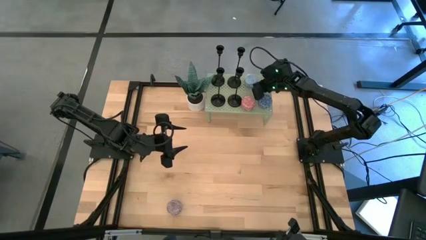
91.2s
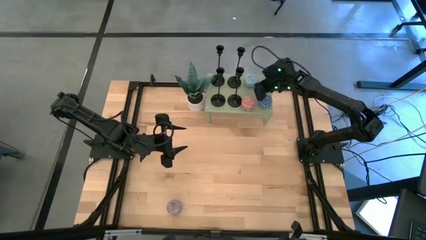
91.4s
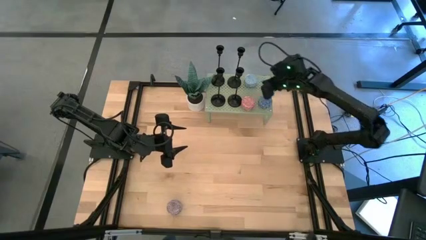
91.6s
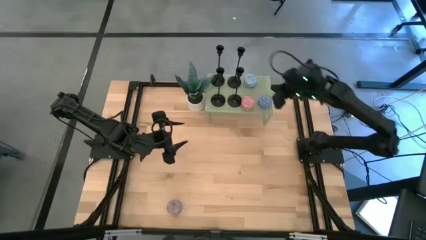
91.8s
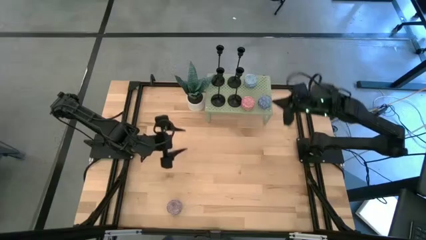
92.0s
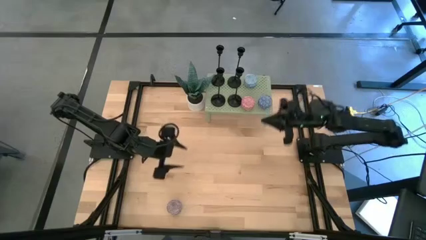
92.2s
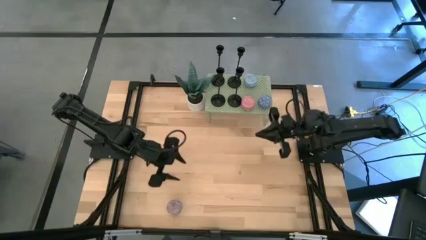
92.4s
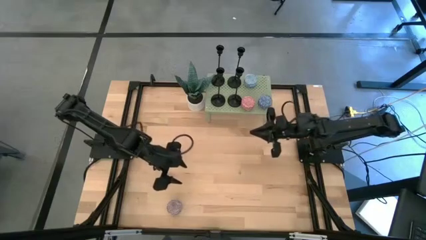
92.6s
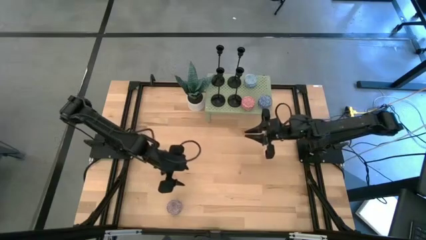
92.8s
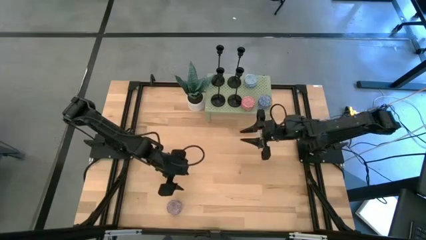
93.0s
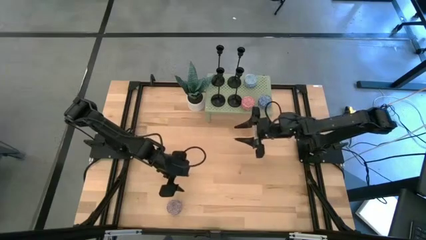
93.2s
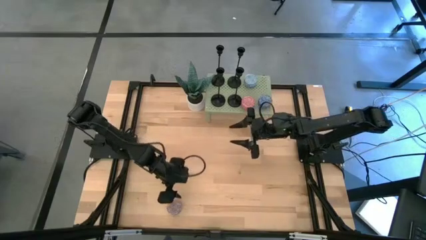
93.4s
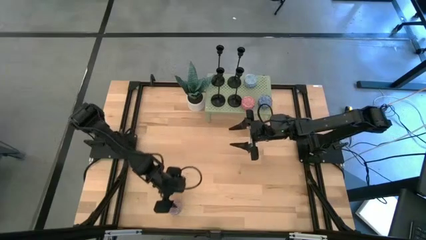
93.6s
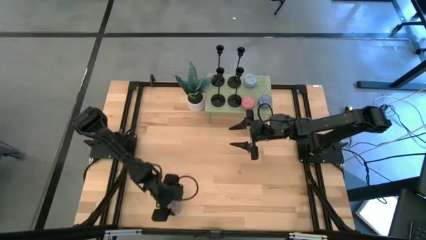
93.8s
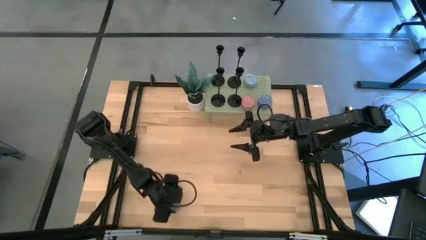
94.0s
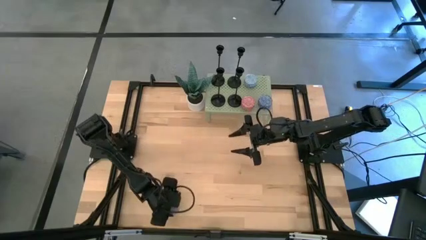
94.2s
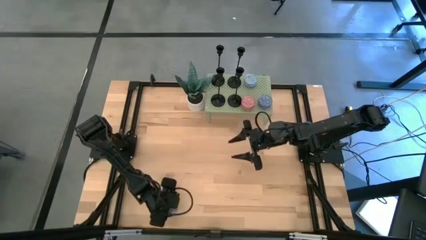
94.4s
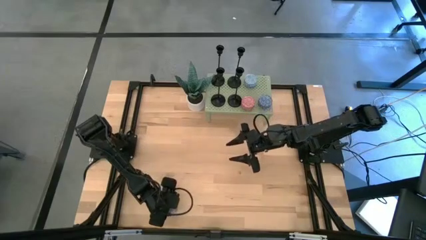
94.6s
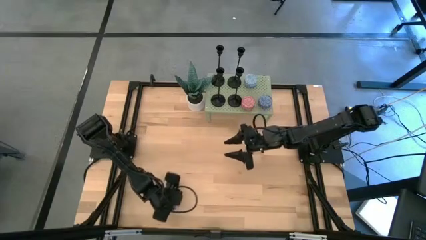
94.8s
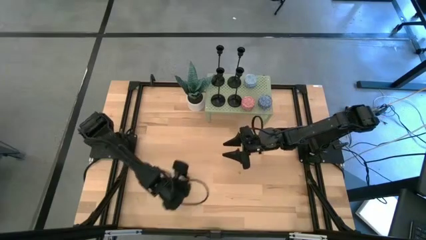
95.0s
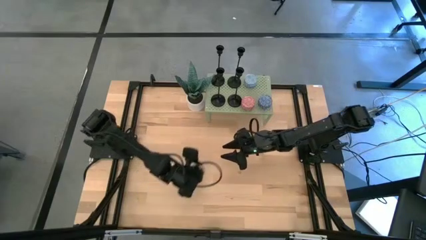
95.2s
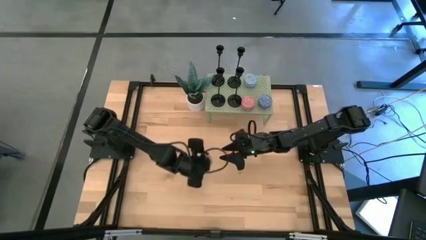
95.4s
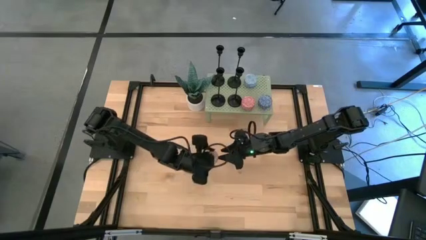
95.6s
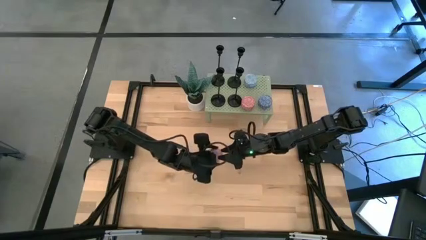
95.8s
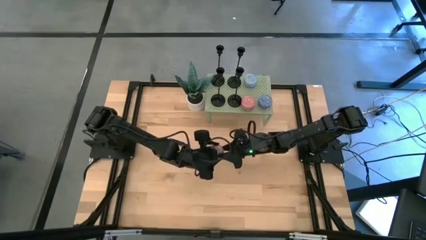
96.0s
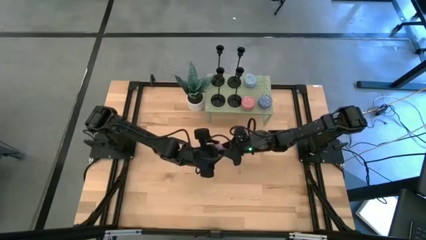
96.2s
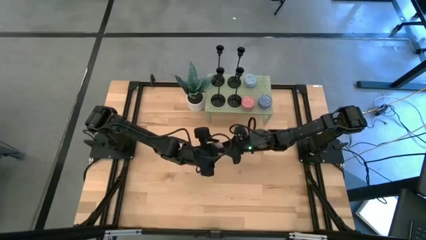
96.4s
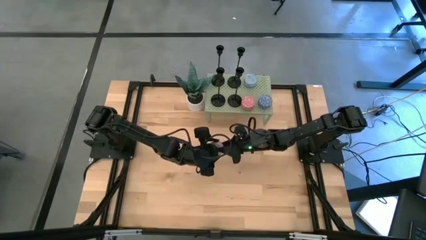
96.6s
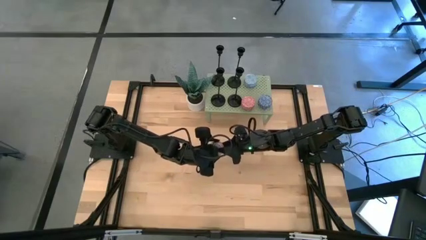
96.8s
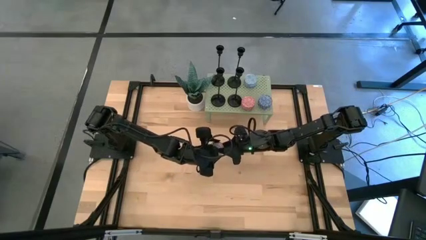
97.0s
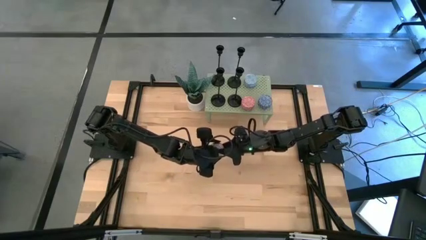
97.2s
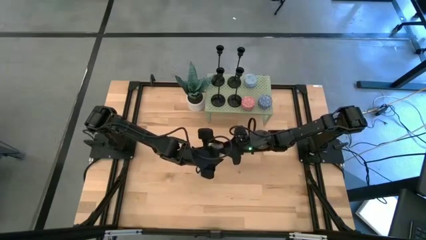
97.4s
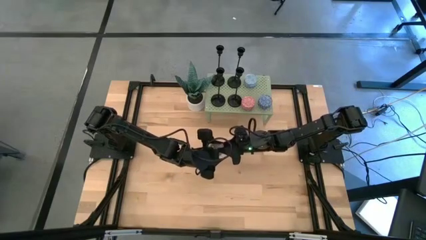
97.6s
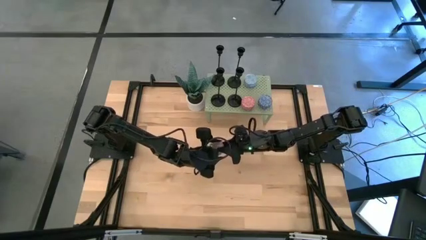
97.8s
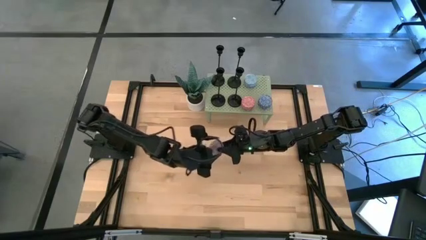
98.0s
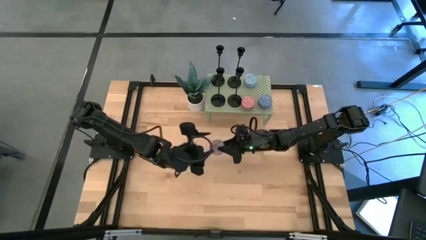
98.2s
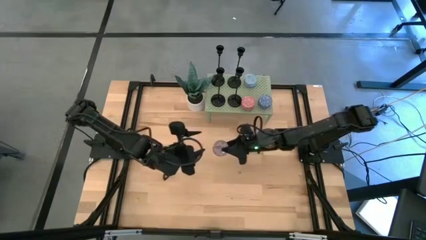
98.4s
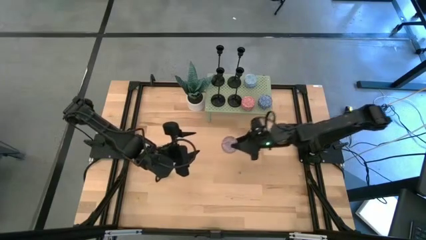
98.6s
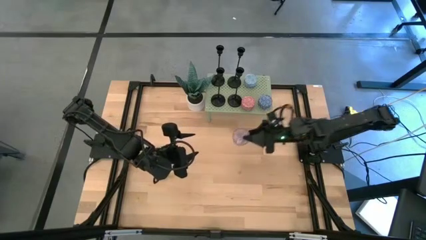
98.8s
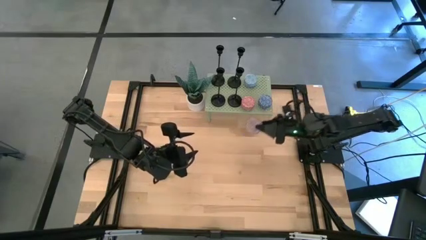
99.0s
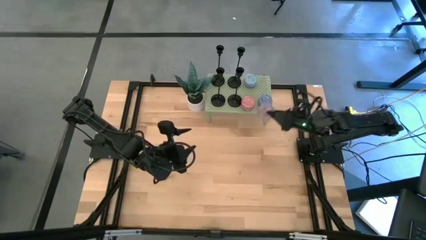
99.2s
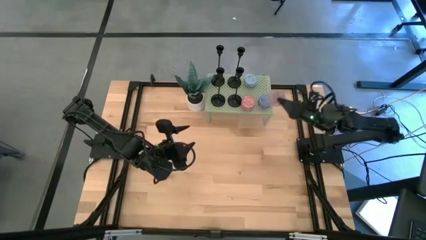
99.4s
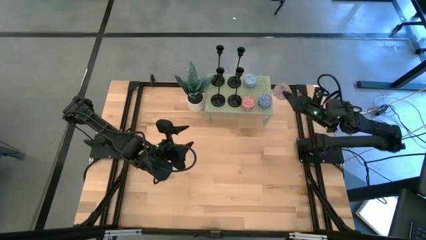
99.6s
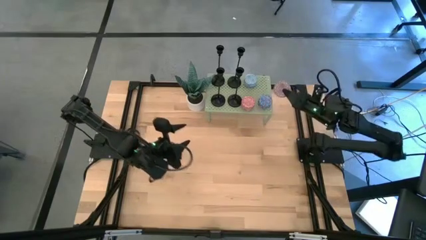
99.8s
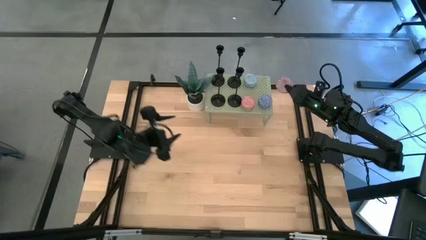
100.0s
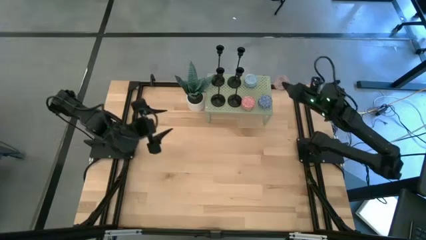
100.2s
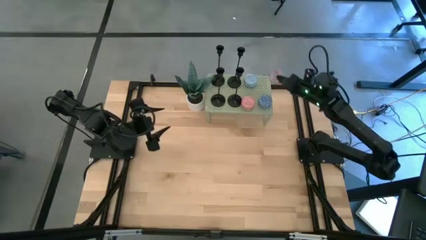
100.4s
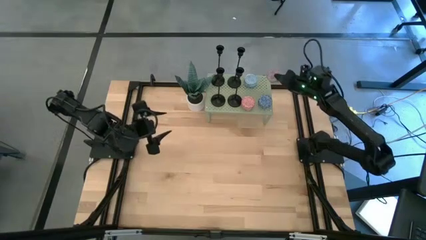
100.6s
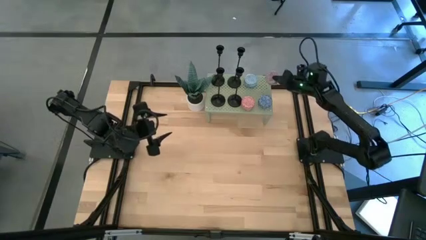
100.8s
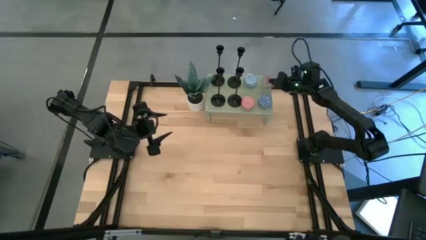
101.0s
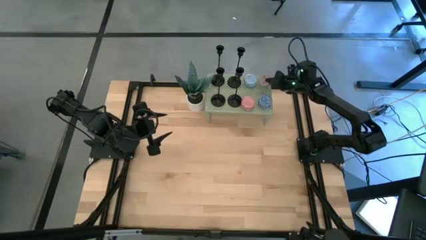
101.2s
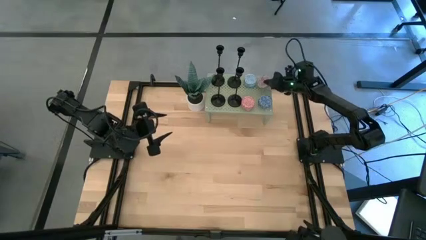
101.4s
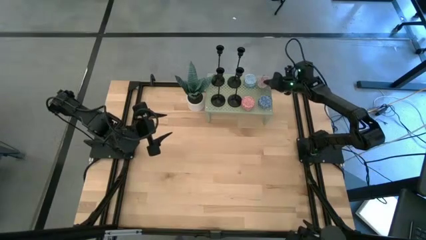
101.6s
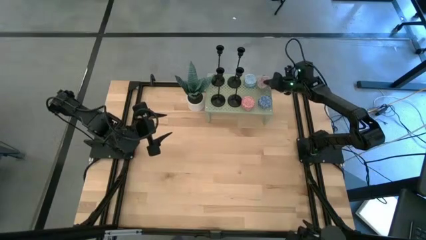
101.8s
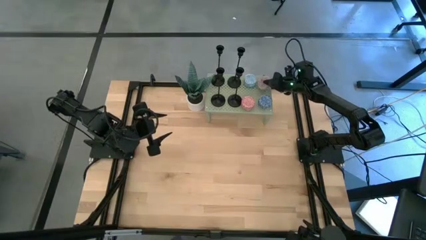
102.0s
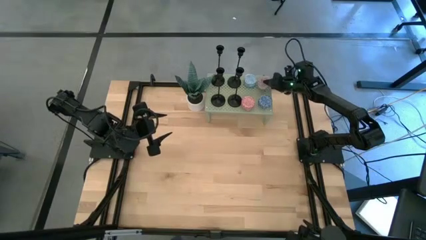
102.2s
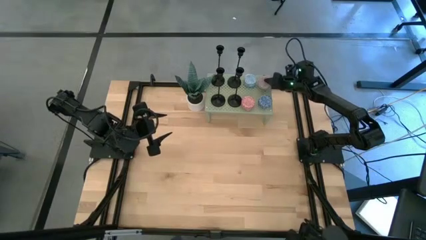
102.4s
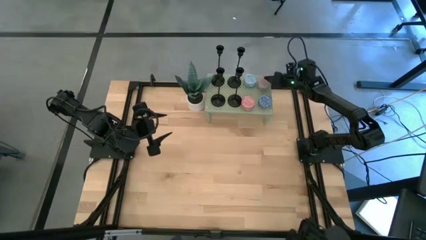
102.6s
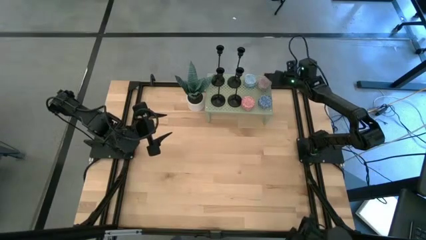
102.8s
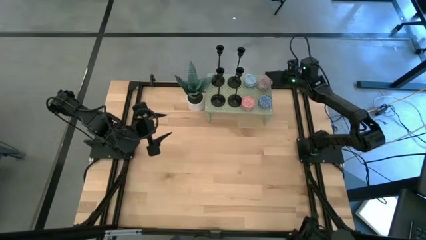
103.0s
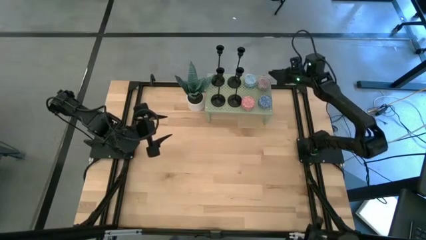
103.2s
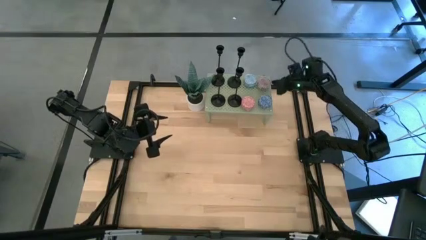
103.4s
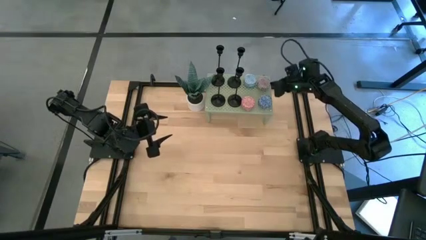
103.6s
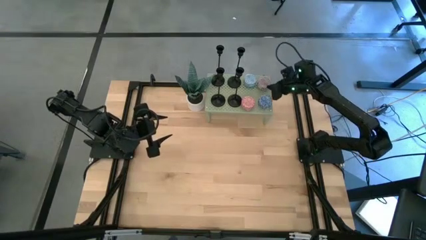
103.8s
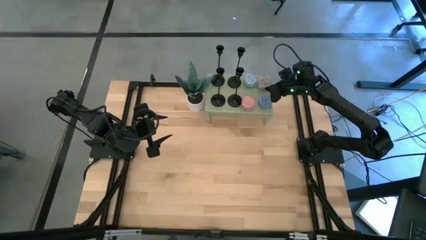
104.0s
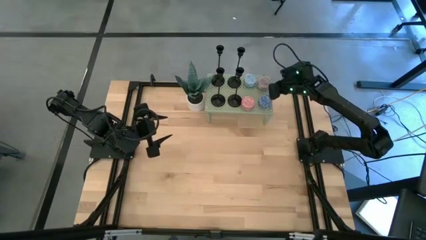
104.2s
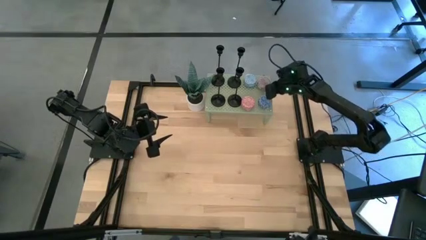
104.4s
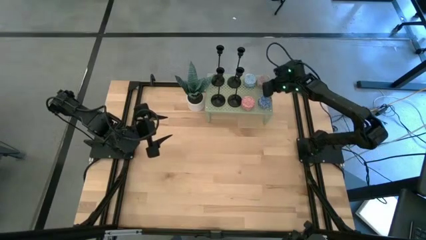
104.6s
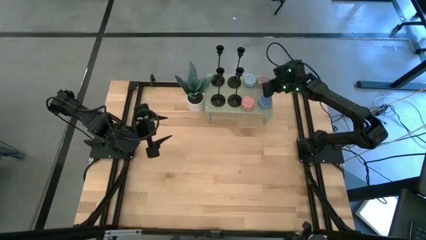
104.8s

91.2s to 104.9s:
Task: Pick & Place candle stick holders
Align the violet scented candle with the other light blue scented candle on the shelf
